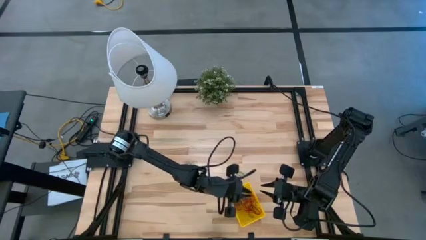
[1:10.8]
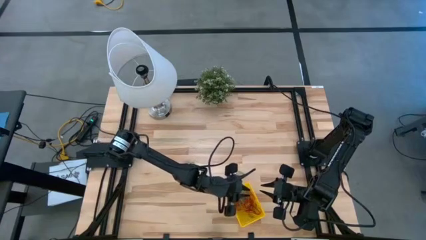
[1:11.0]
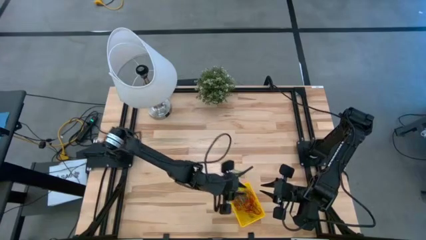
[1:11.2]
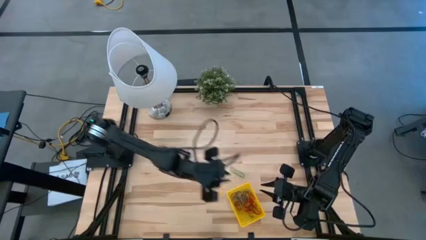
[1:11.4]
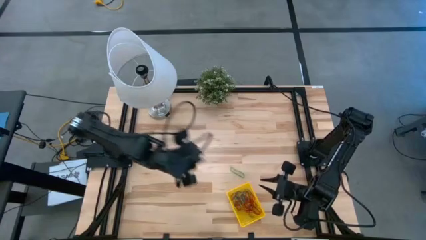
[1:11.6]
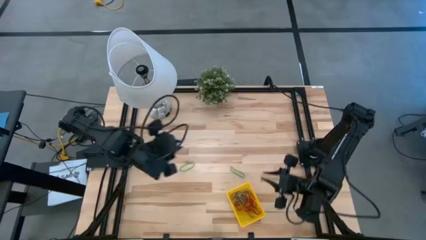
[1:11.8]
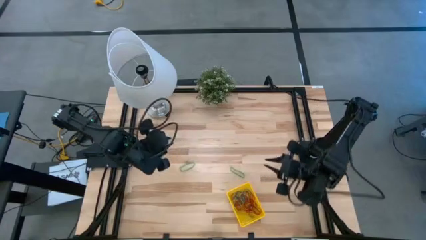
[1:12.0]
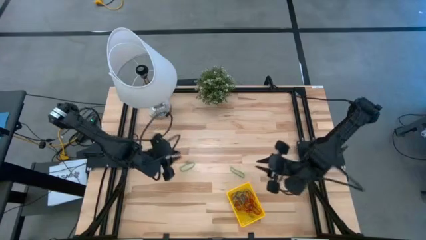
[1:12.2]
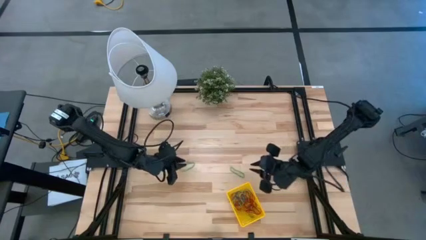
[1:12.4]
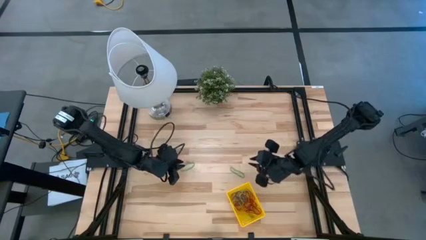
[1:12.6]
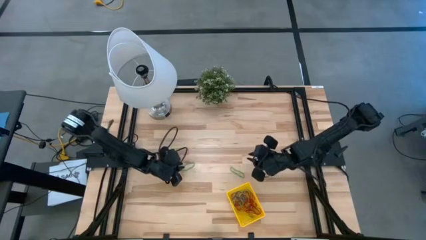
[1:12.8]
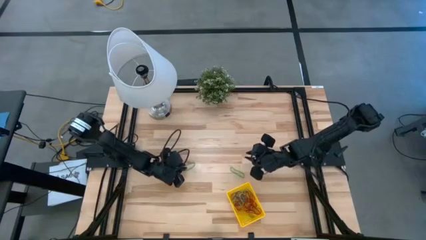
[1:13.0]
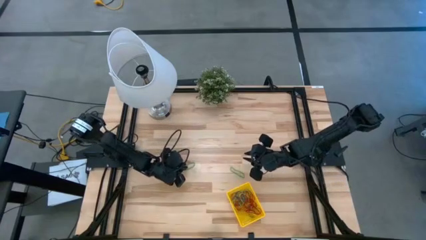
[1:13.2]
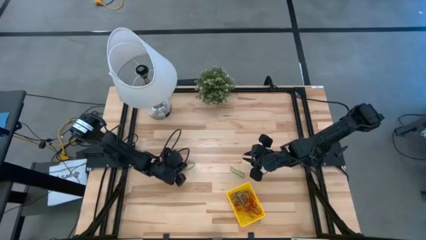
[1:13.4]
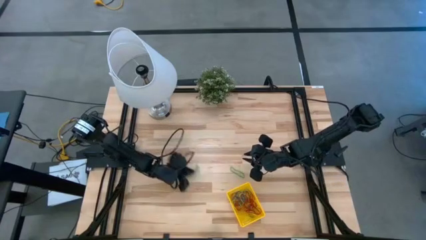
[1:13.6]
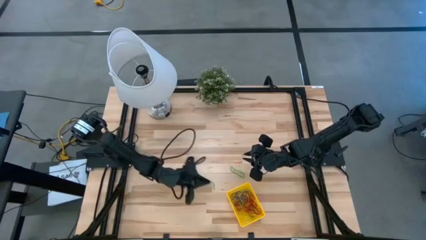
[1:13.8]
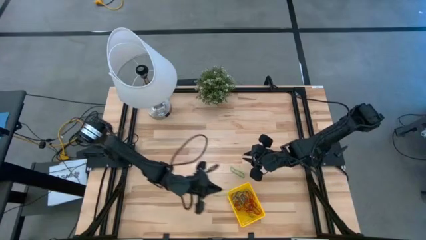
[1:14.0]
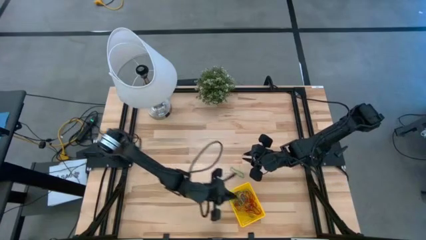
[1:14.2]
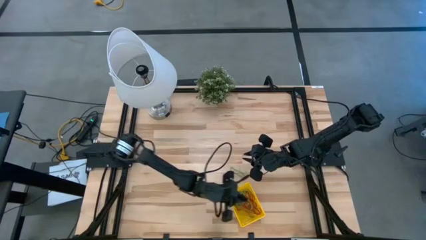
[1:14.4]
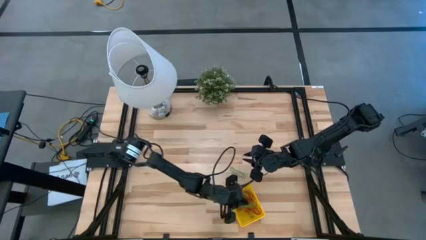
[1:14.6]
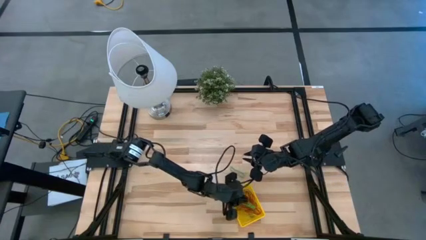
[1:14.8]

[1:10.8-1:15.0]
Task: Pick and place items into bin
Put the left green rubber band into the bin

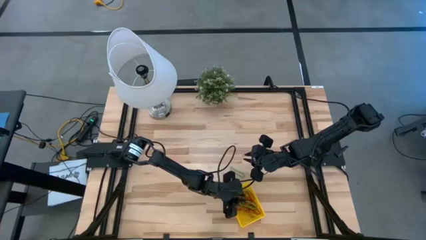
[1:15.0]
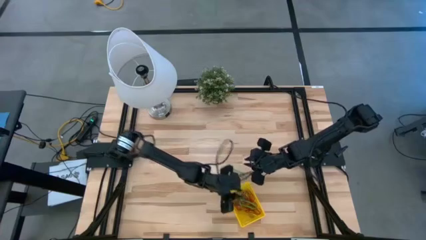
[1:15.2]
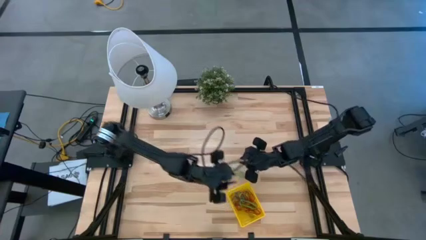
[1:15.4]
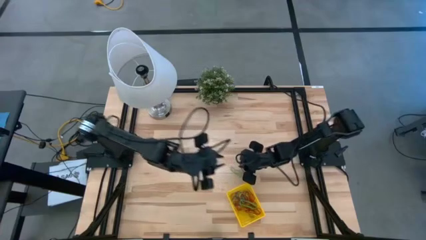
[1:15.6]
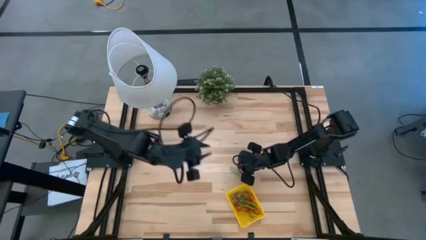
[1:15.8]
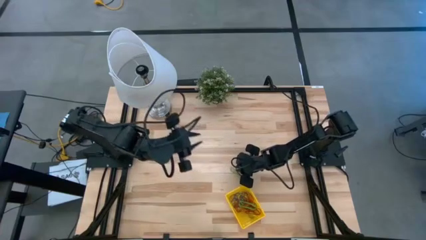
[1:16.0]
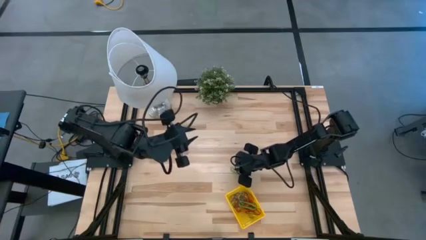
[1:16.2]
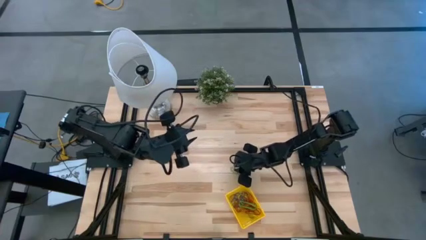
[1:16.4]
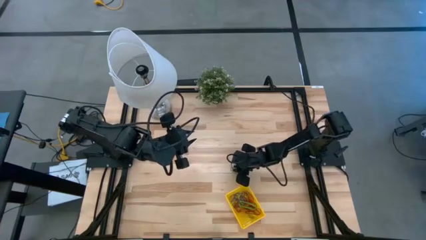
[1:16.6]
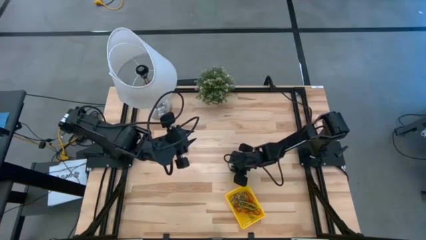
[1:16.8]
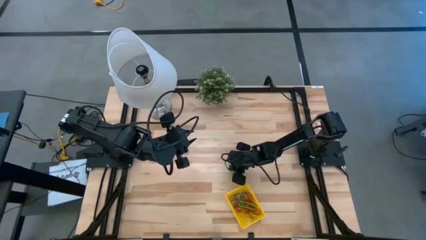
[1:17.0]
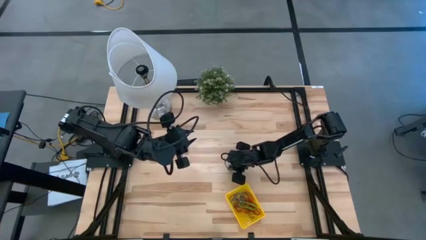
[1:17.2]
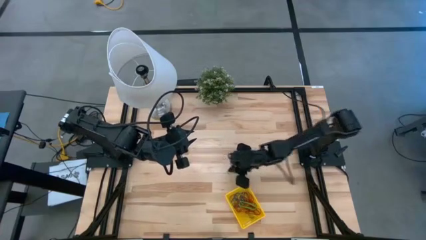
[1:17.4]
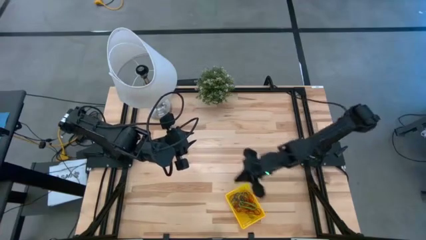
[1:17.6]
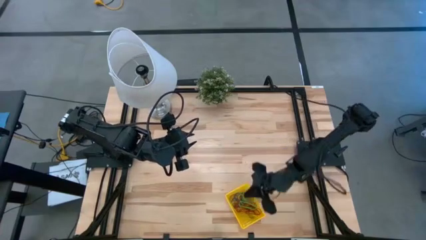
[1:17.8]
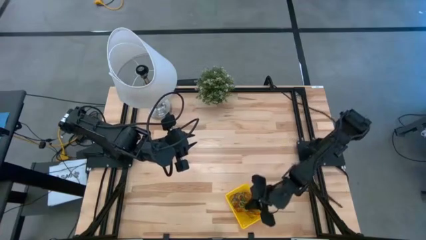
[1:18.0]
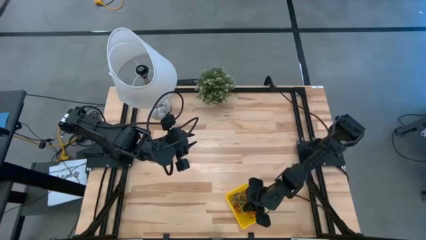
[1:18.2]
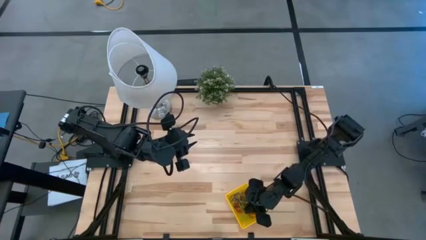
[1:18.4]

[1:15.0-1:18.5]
Put the green rubber band into the bin

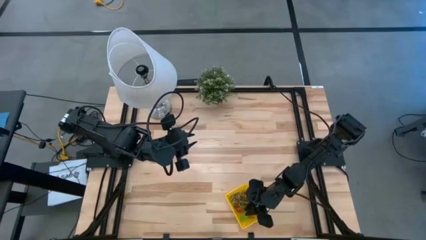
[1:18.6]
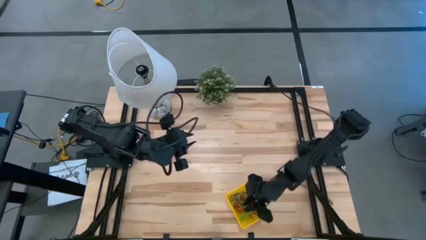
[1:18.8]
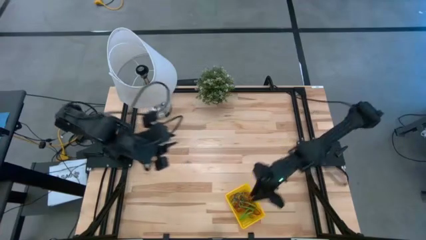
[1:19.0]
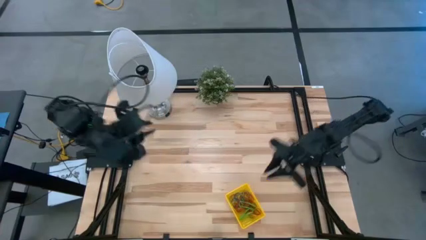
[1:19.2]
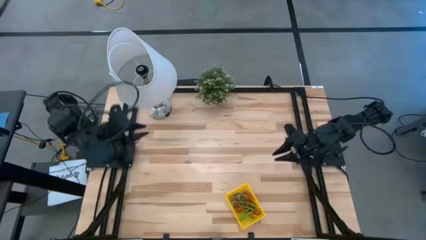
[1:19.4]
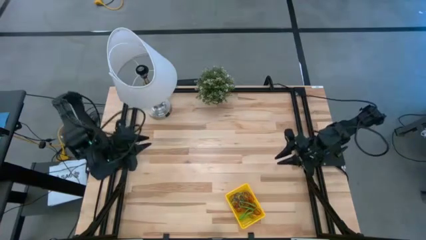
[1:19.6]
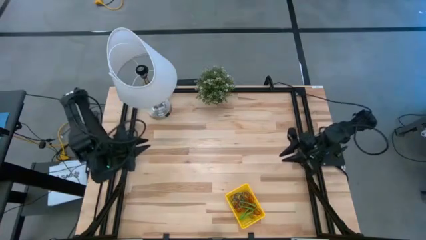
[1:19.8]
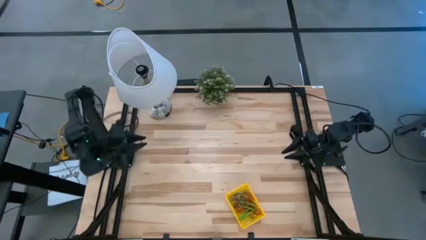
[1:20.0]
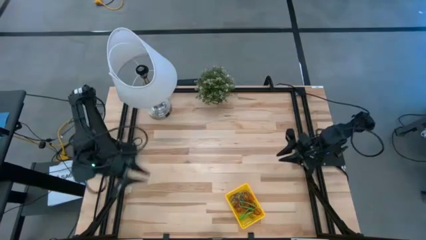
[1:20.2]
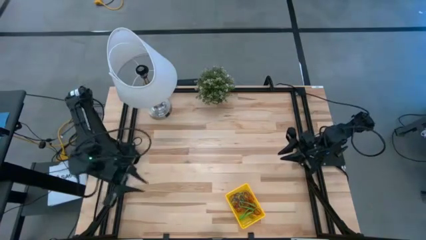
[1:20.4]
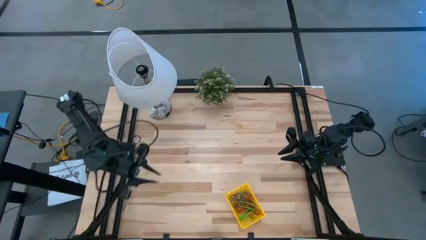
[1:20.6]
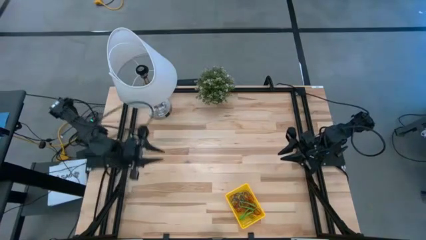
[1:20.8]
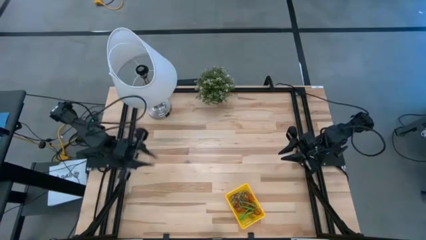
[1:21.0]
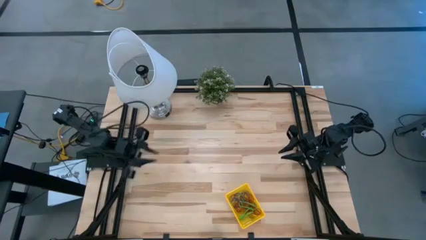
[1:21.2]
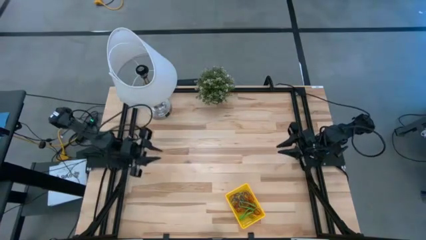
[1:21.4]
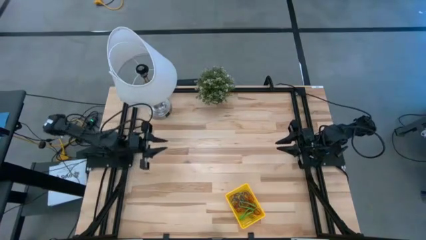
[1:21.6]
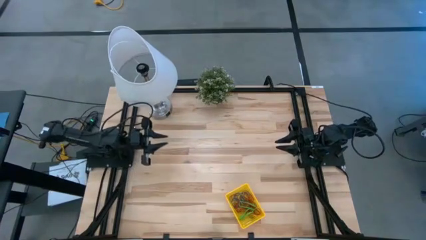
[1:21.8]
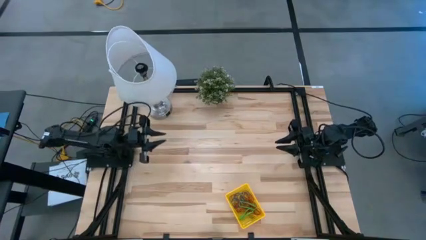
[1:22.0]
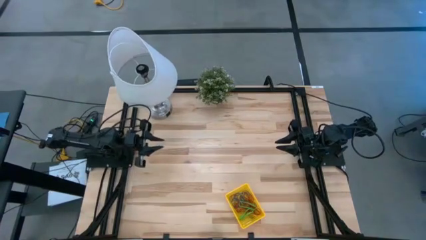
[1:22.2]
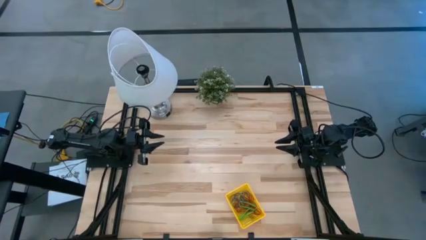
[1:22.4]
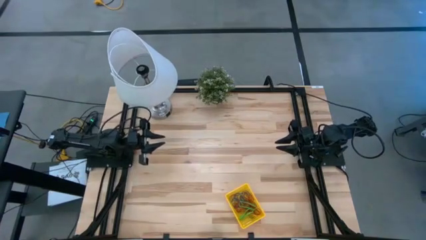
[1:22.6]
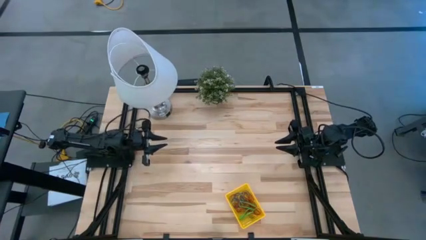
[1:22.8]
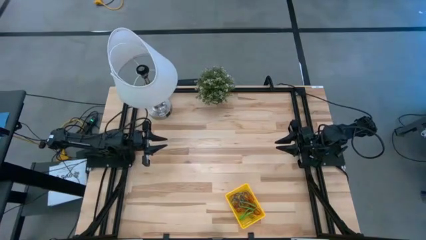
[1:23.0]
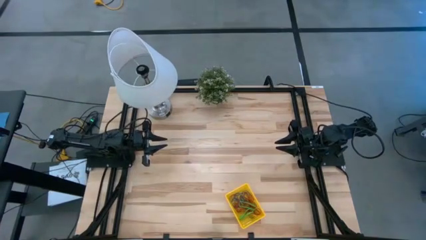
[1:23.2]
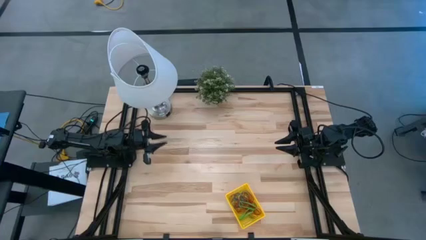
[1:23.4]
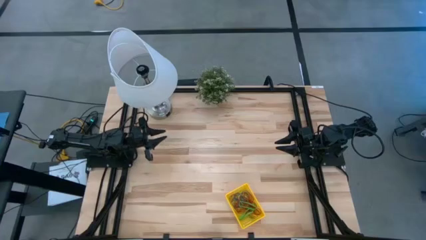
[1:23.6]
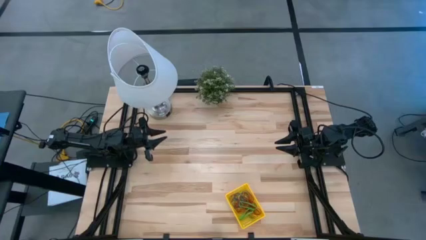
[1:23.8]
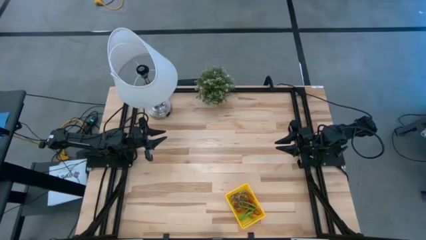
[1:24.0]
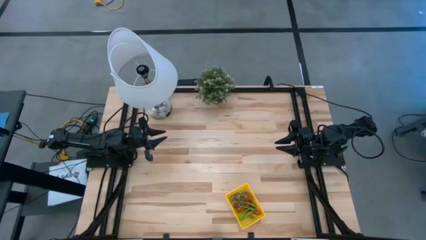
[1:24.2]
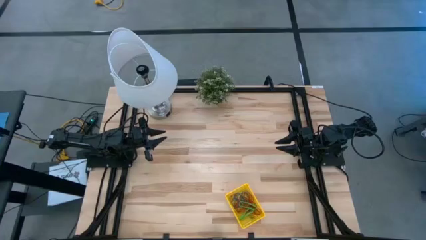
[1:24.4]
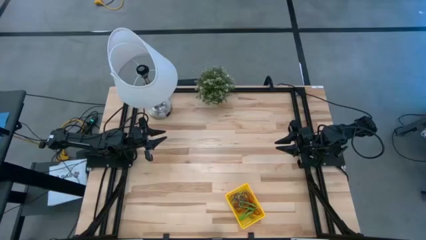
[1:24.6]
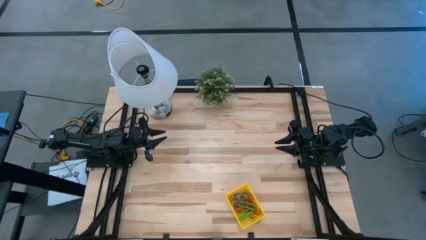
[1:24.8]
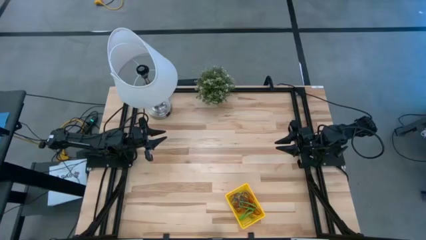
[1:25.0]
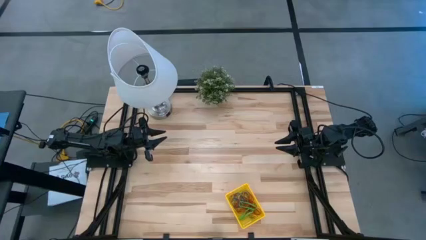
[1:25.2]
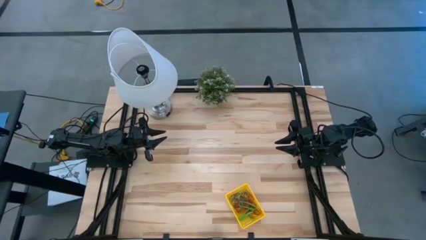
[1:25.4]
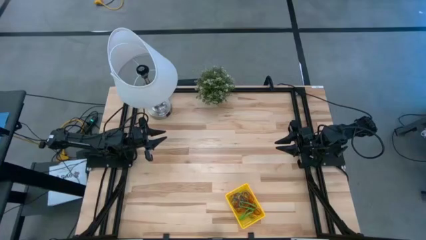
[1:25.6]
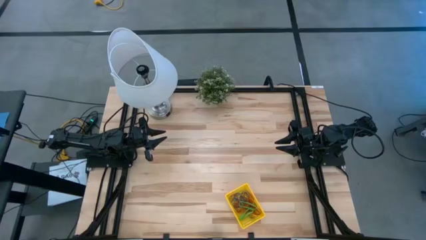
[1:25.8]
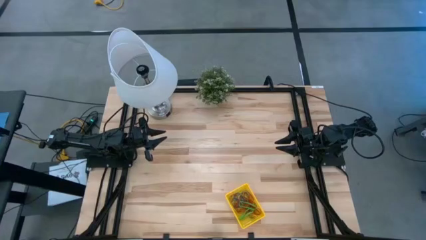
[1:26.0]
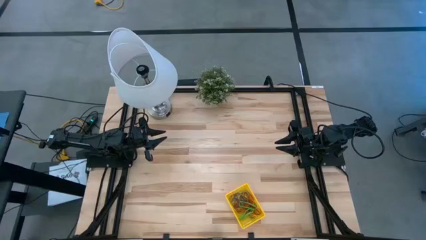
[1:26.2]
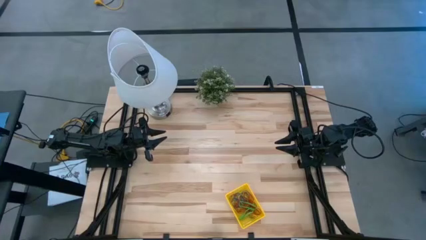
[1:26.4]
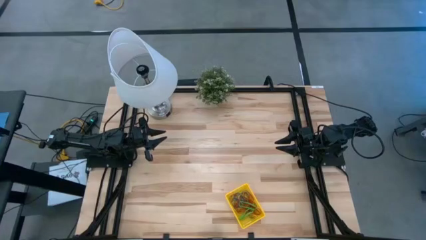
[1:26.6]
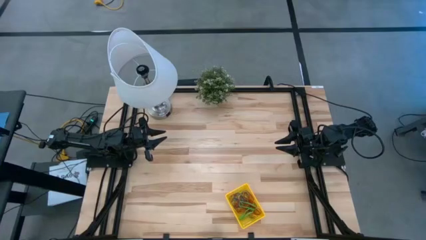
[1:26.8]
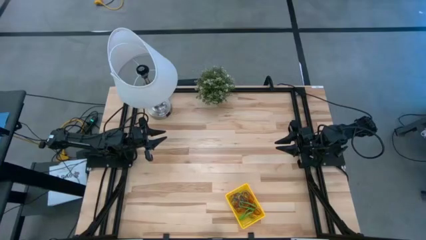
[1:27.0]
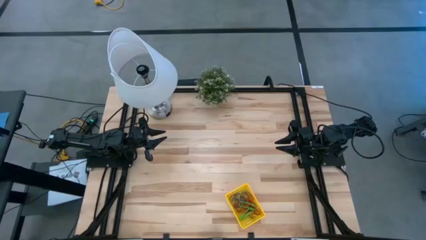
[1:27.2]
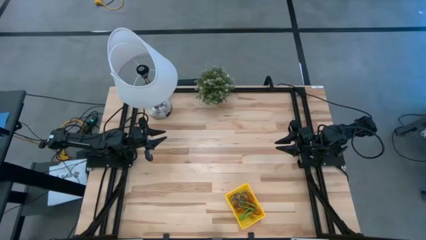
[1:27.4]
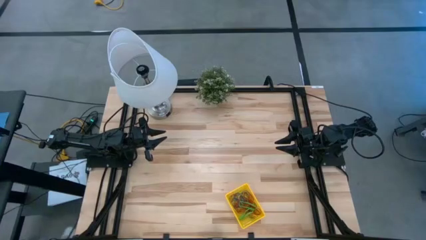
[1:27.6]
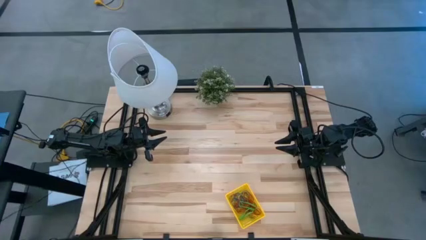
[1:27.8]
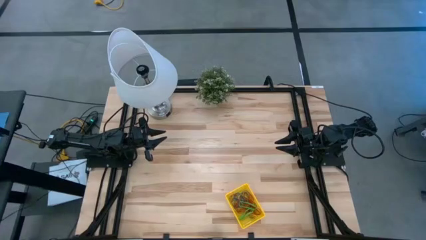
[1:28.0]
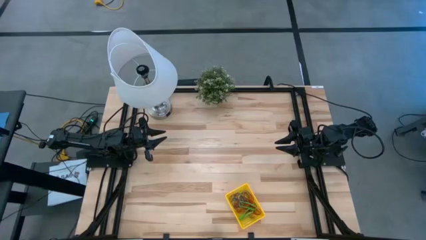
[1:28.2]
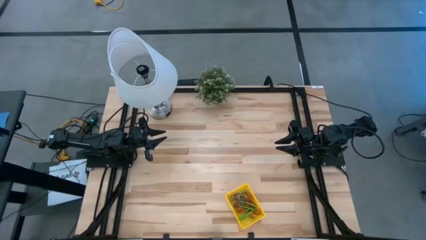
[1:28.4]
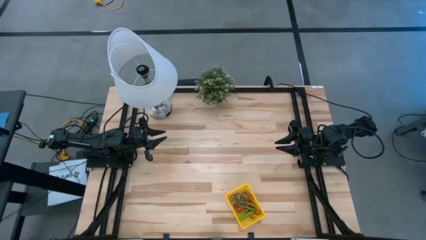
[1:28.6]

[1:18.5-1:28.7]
Return to Home Position
